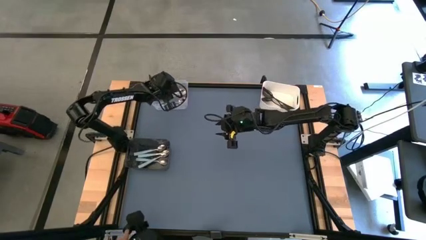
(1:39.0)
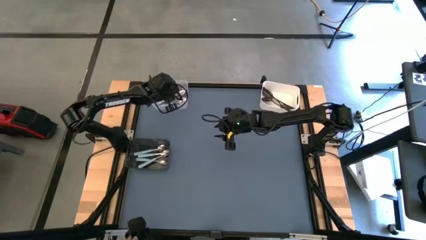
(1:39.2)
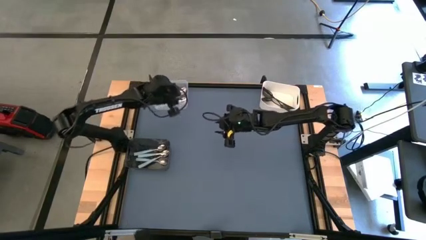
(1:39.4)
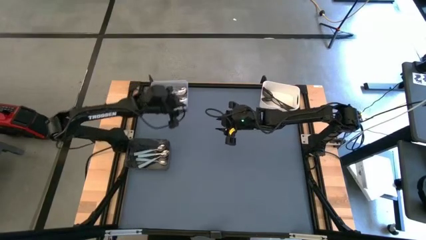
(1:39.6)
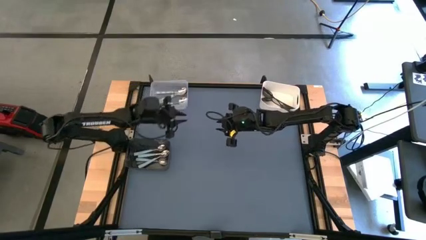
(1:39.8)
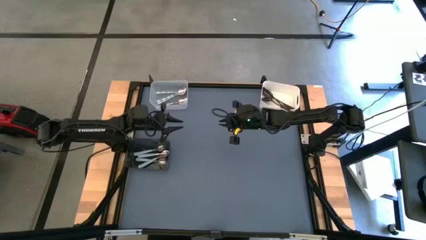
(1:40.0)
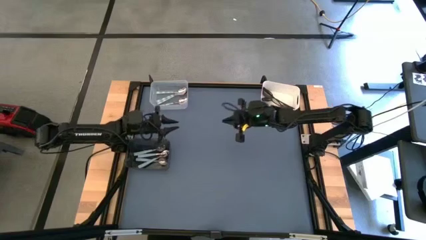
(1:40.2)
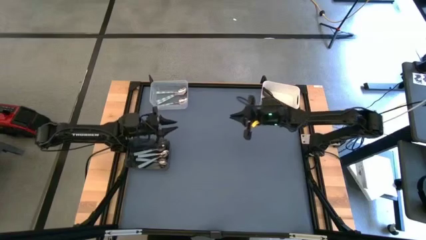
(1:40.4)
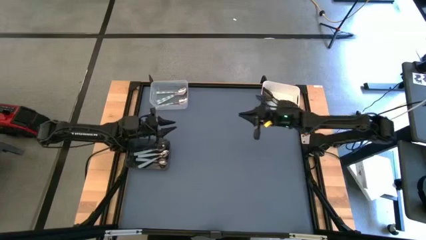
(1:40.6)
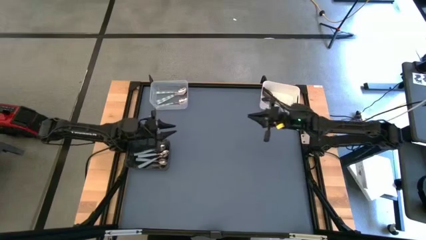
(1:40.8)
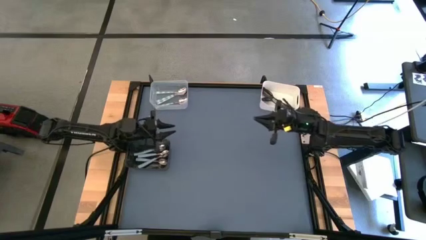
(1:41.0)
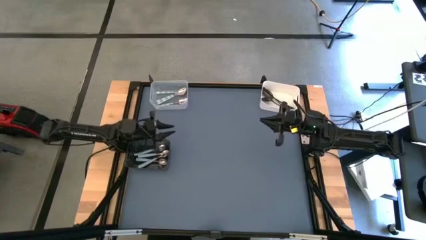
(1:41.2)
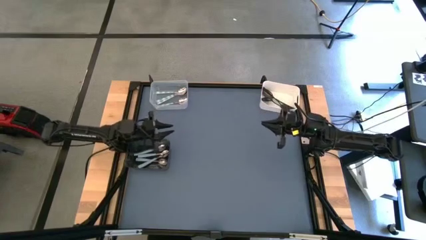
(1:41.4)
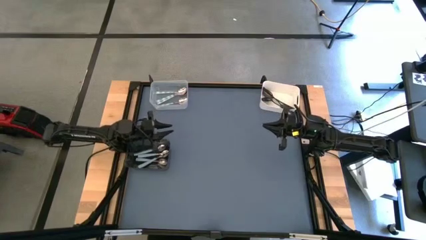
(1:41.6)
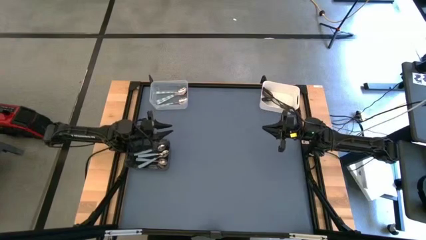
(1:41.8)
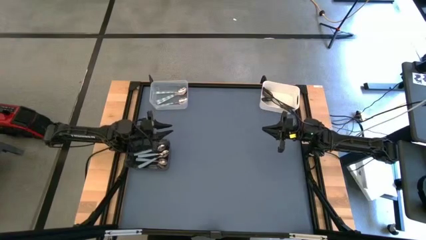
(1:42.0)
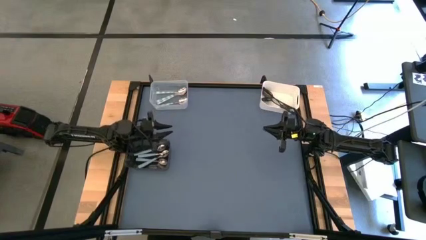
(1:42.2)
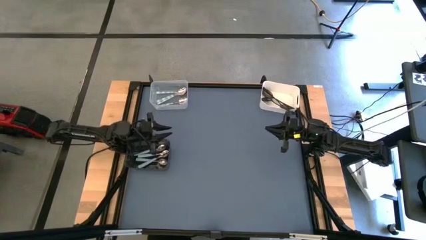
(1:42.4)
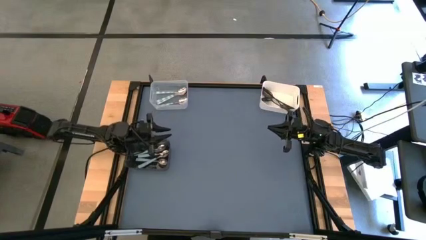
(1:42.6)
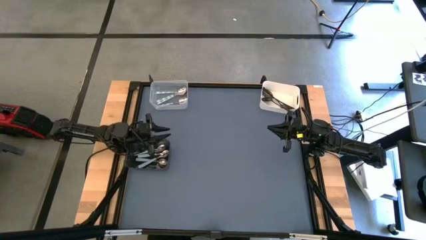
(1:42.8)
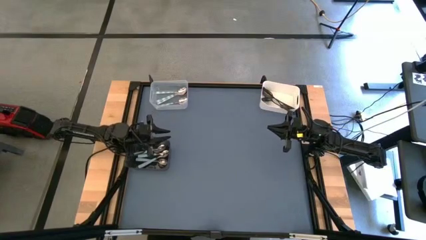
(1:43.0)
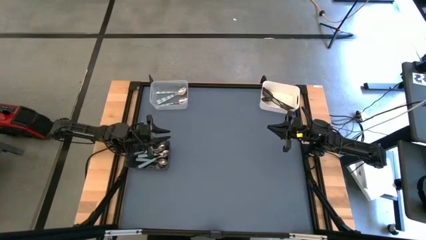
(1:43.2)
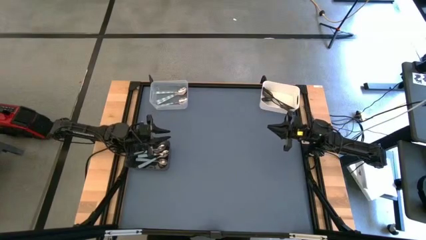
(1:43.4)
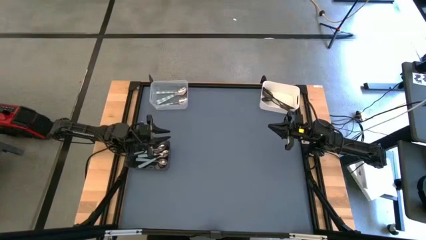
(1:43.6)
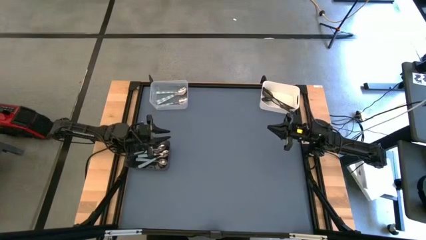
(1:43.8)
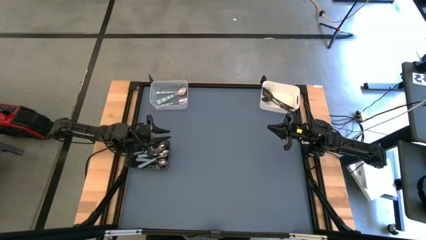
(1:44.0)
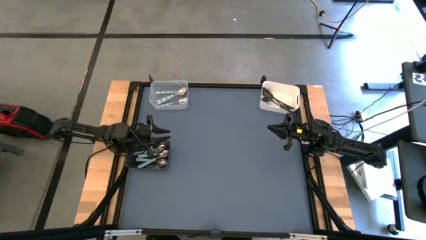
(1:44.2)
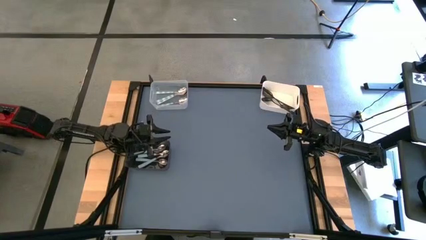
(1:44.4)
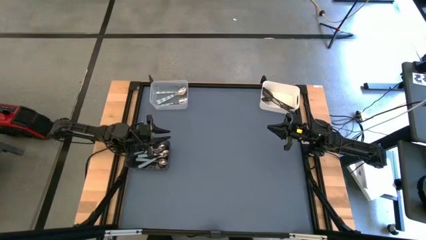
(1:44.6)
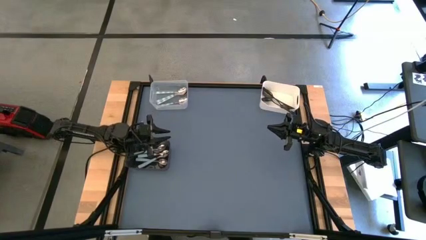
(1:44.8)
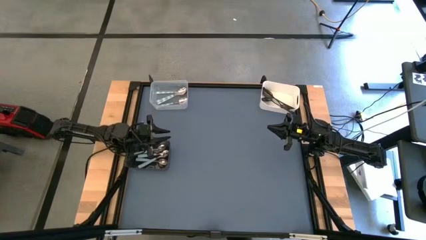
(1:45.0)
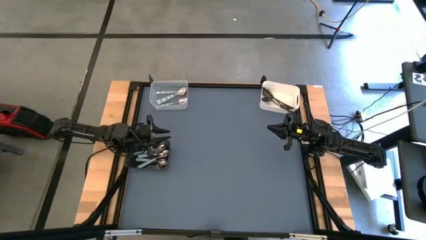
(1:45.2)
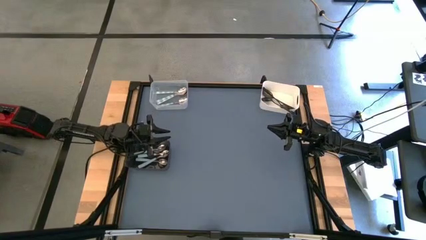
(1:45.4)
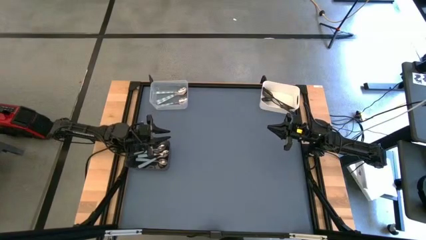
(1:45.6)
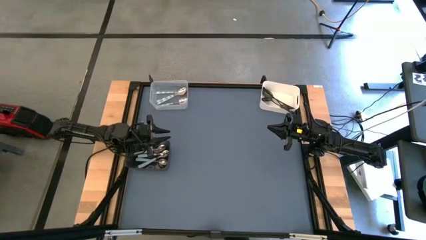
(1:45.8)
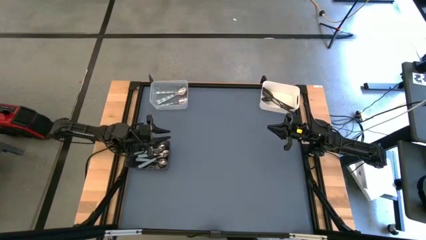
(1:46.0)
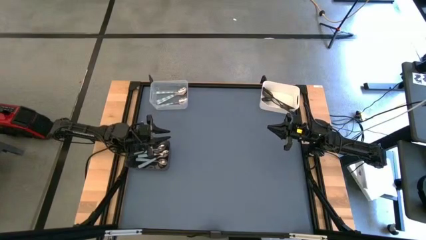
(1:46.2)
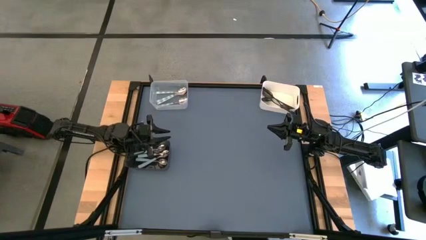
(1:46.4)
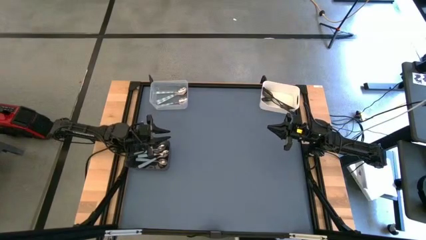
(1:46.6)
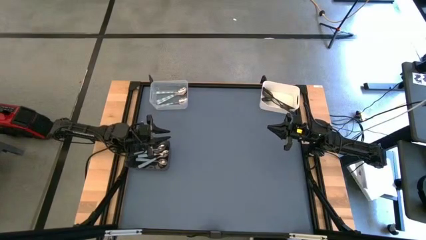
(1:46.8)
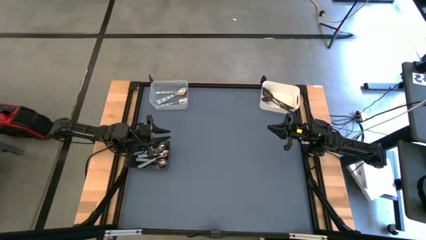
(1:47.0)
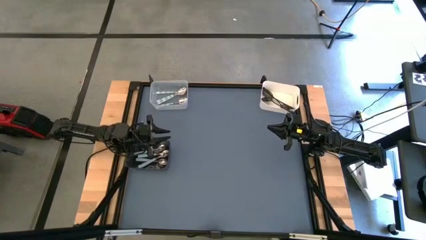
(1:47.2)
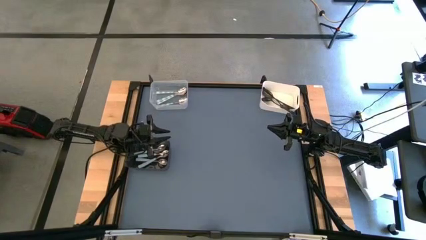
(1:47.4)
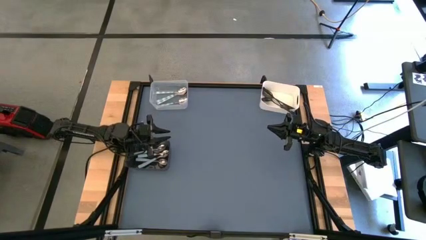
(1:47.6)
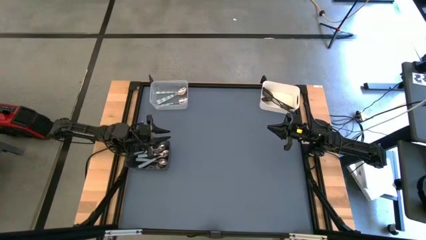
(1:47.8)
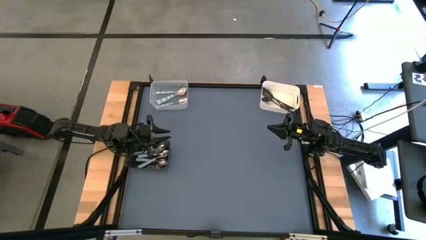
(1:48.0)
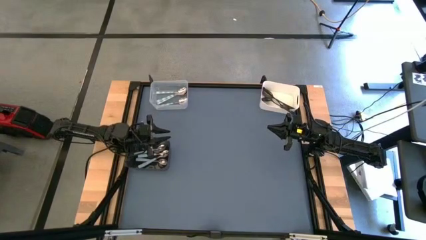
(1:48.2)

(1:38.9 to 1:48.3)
Task: Sort silverware by color (type)
Return to Home Position

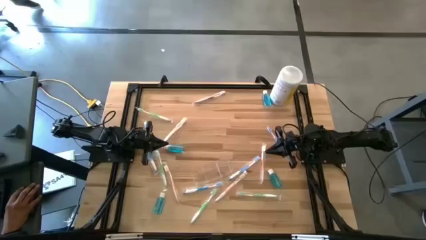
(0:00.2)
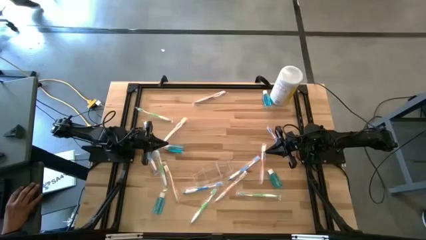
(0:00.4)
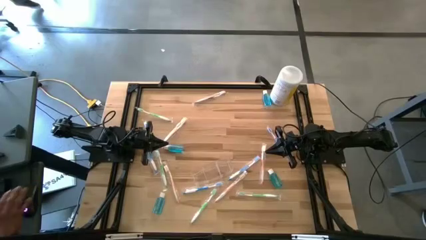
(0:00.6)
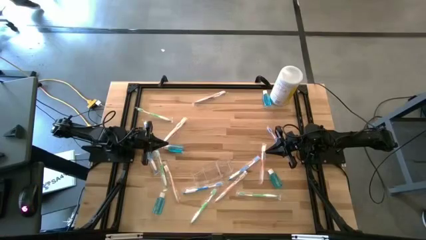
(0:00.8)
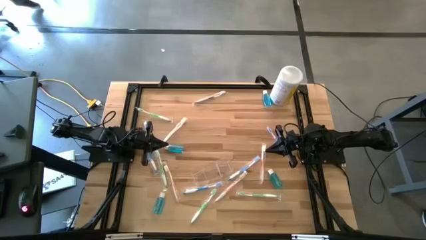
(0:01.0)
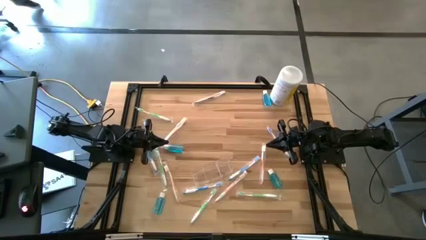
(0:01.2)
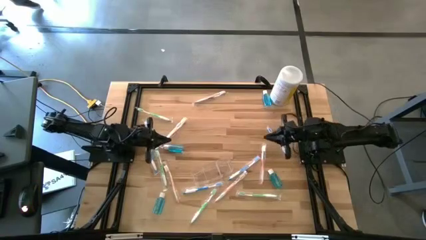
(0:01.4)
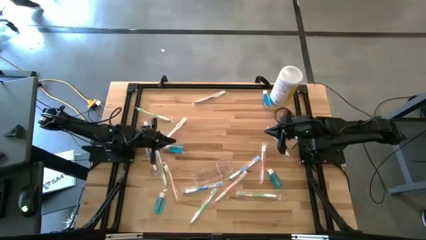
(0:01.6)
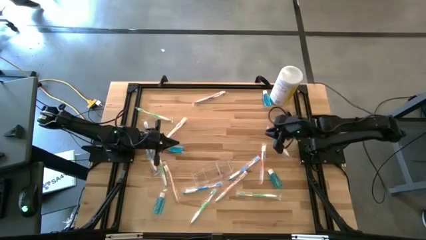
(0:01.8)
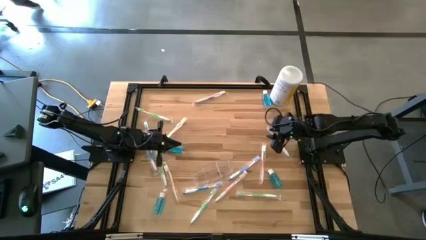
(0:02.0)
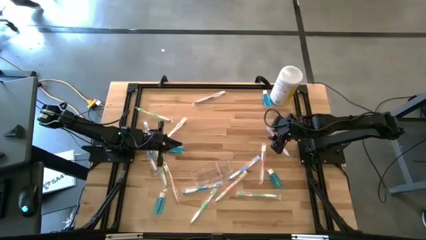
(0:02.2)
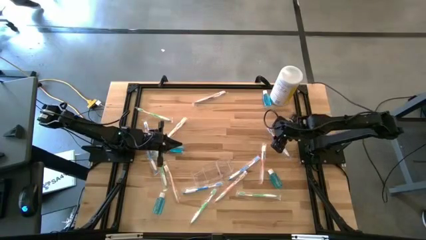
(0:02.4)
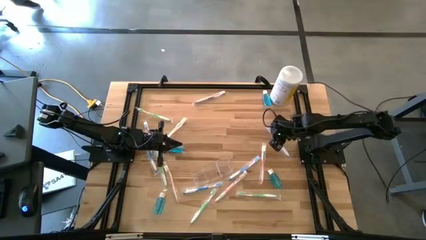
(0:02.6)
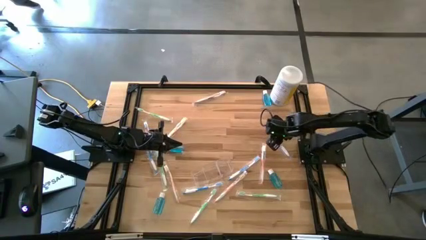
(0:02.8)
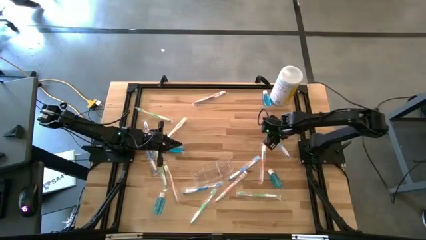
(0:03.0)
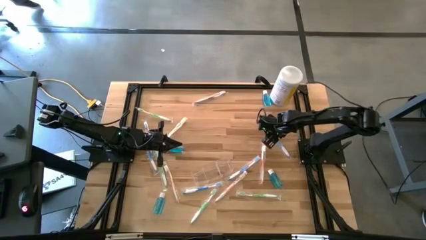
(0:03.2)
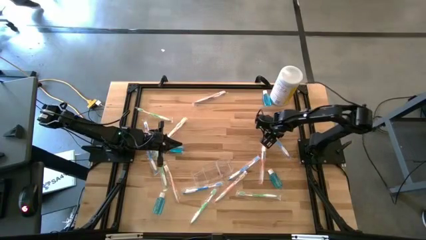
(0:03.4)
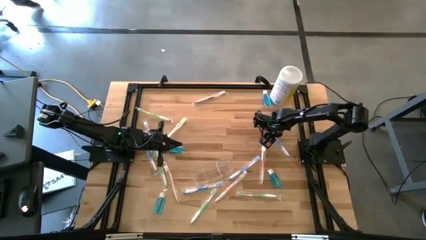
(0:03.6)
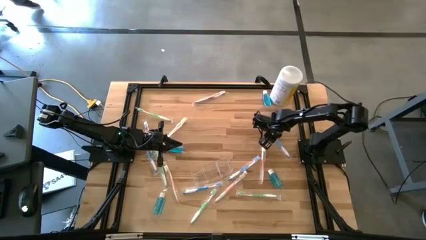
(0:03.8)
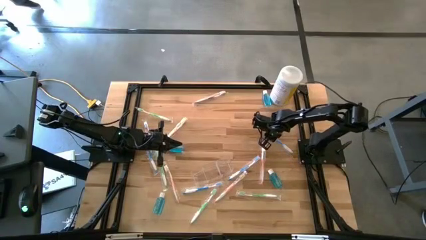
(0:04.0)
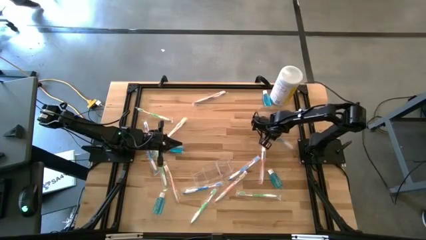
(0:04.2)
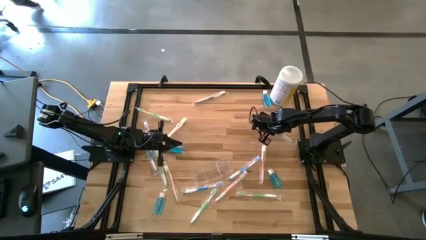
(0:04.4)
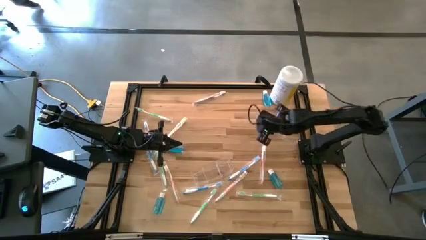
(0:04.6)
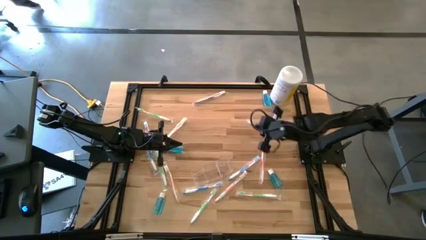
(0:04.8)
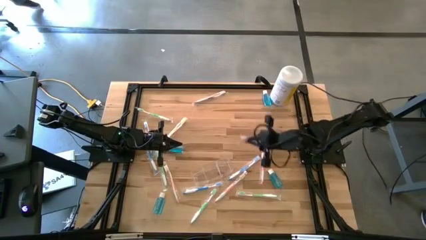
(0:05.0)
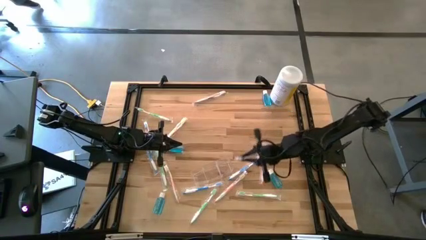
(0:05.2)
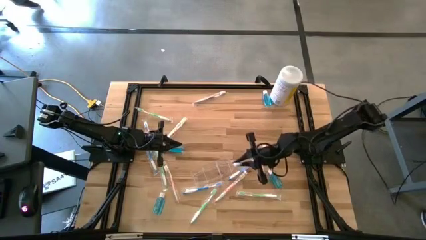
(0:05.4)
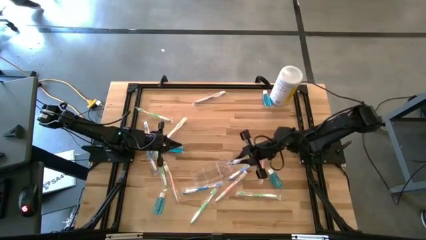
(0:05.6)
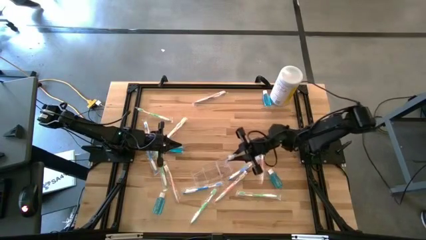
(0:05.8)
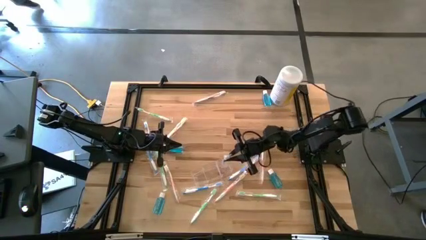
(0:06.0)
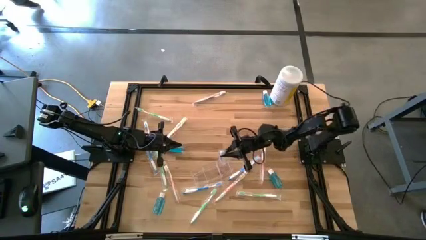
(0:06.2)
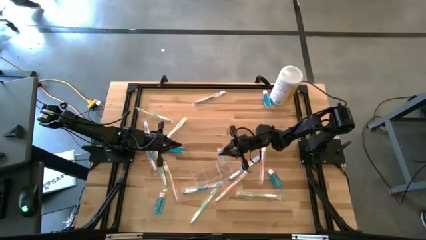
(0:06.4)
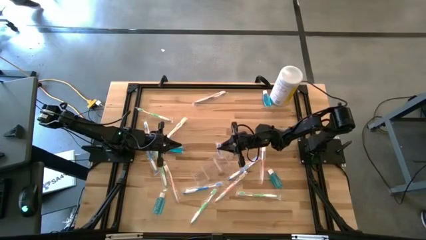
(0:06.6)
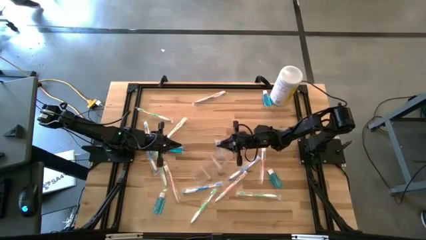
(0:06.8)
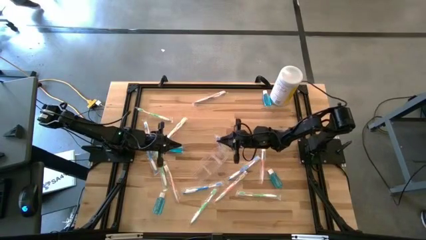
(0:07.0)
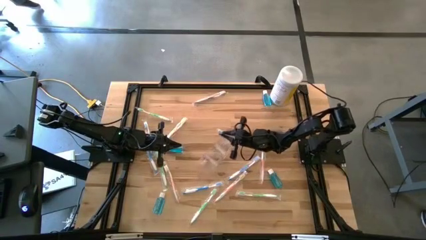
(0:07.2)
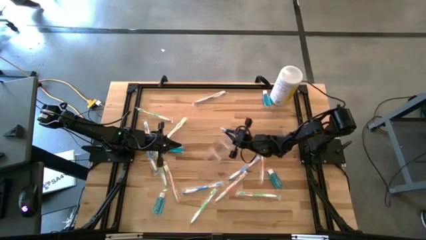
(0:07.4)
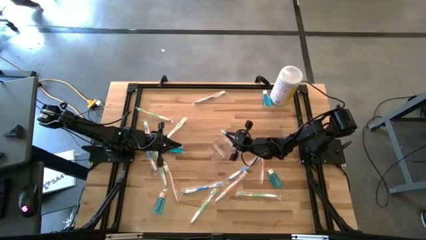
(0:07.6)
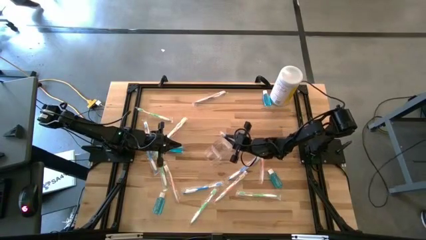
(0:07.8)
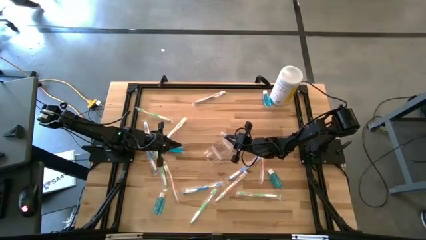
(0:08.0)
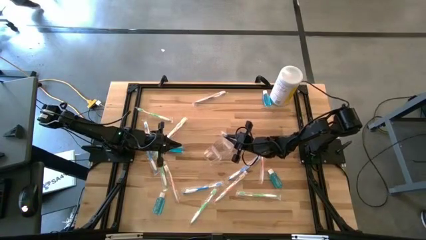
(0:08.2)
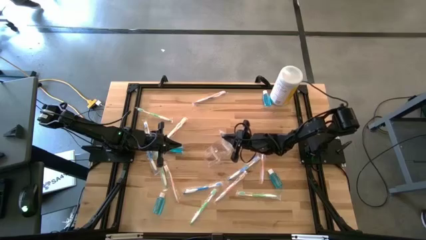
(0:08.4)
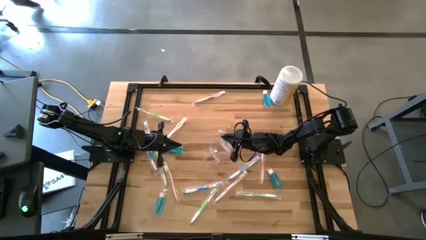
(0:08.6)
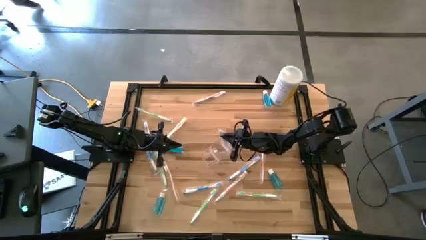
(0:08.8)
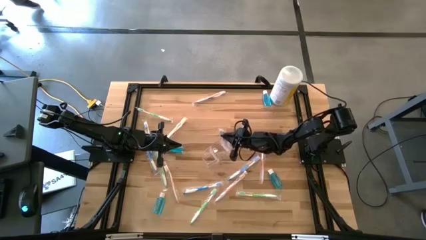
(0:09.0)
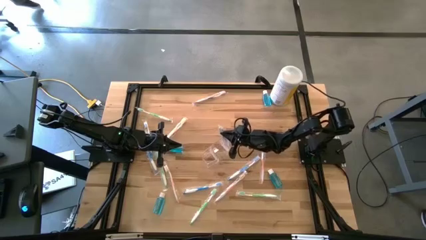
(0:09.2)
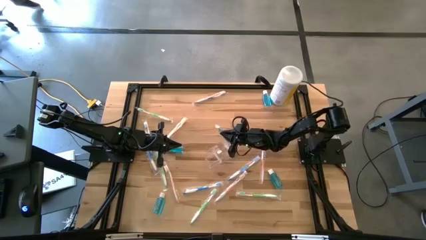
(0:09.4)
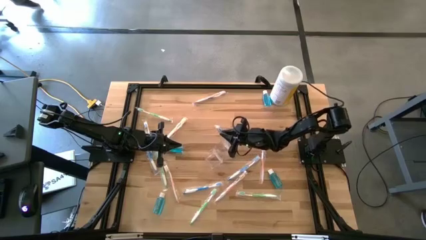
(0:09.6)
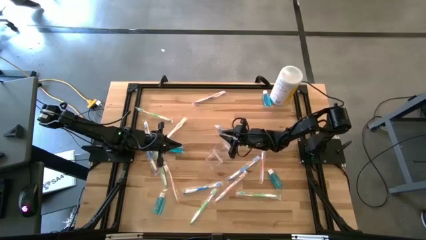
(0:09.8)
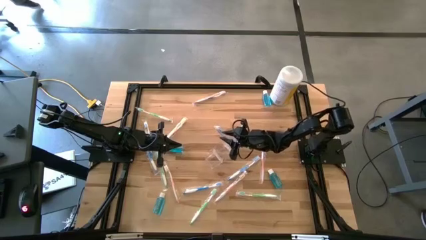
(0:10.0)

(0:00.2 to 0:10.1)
Task: Pick & Place toothbrushing station
Put the blue toothbrush into the transparent organizer
